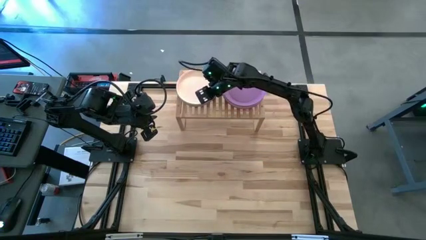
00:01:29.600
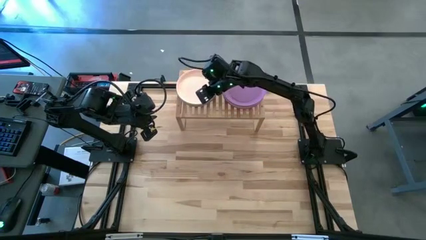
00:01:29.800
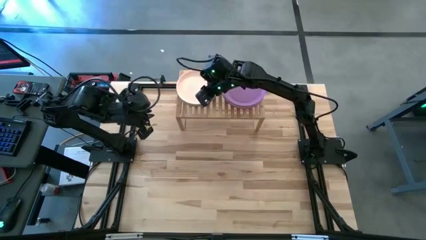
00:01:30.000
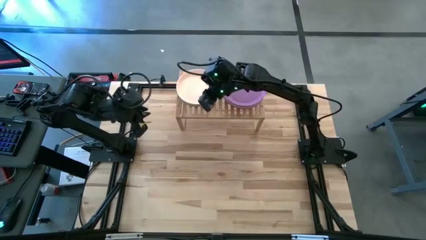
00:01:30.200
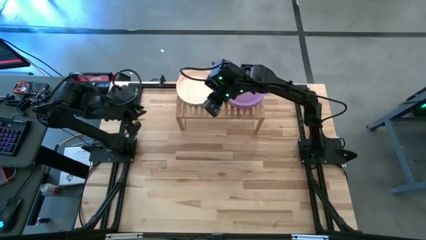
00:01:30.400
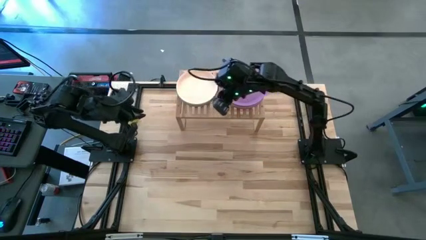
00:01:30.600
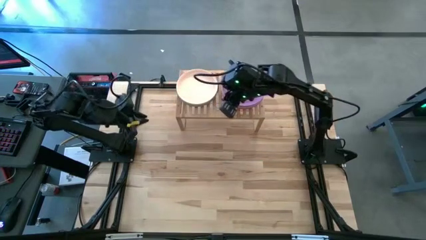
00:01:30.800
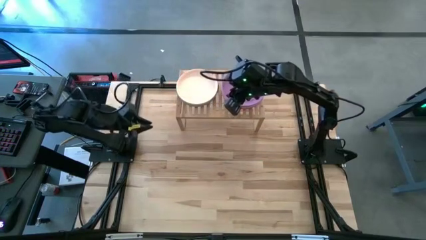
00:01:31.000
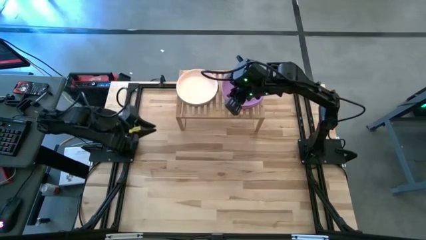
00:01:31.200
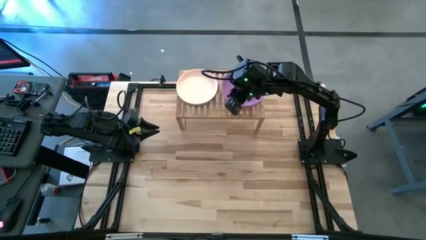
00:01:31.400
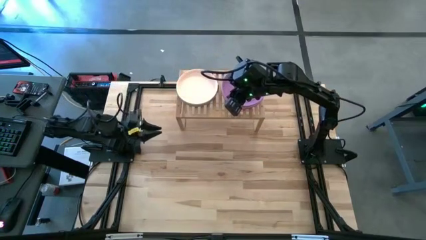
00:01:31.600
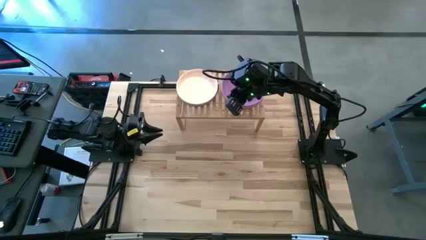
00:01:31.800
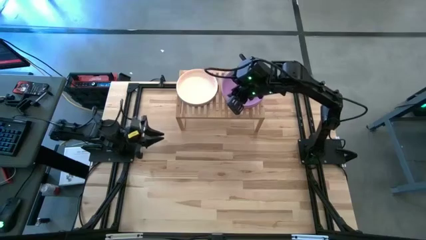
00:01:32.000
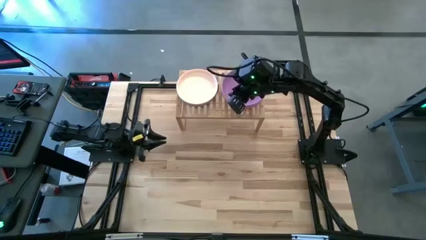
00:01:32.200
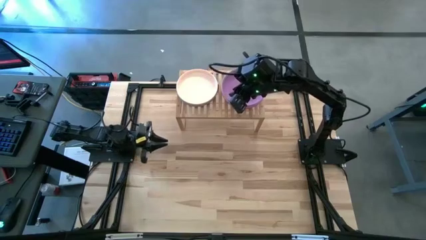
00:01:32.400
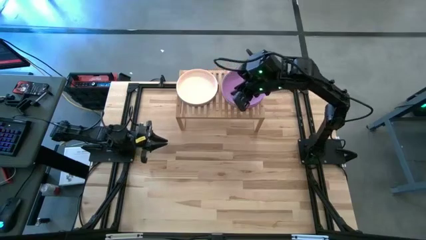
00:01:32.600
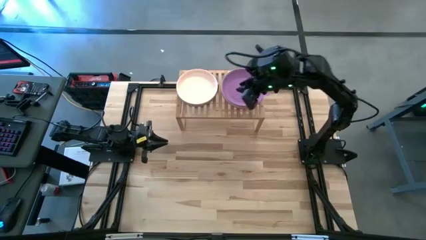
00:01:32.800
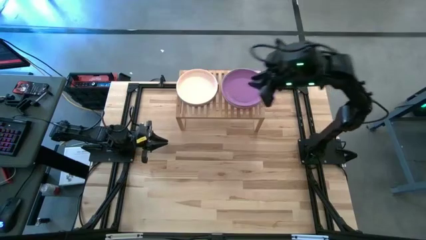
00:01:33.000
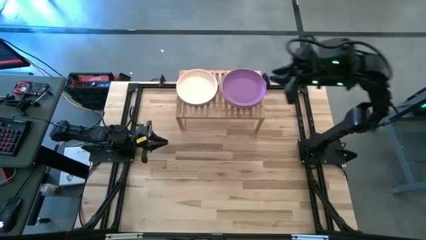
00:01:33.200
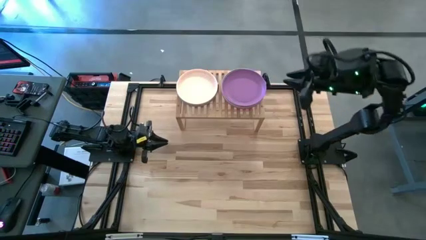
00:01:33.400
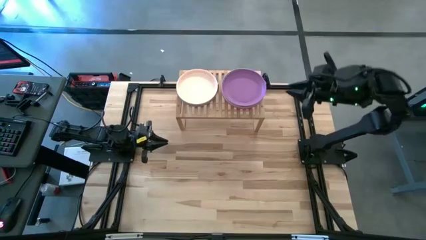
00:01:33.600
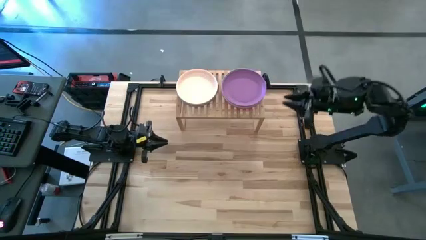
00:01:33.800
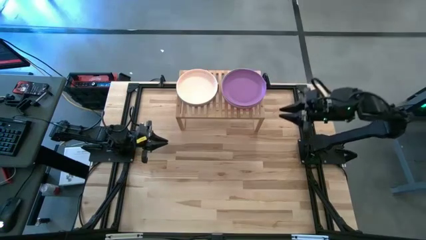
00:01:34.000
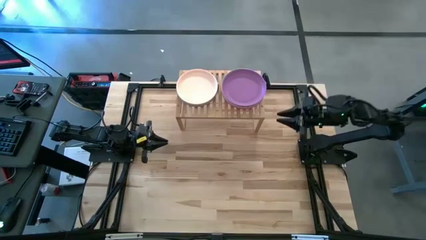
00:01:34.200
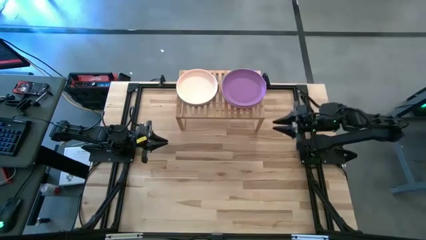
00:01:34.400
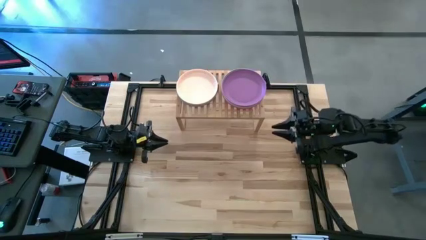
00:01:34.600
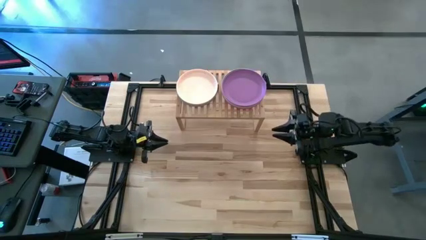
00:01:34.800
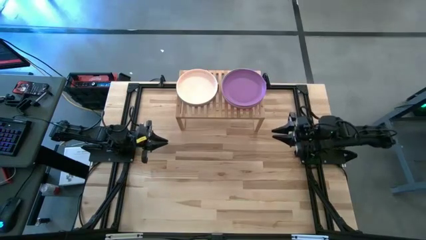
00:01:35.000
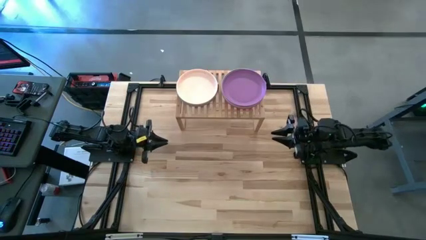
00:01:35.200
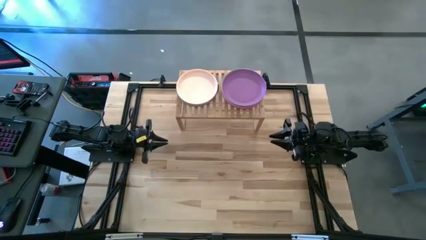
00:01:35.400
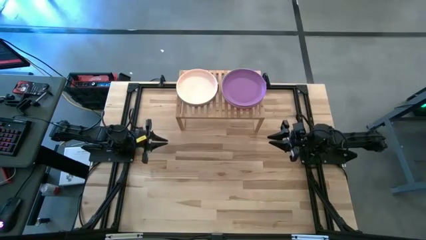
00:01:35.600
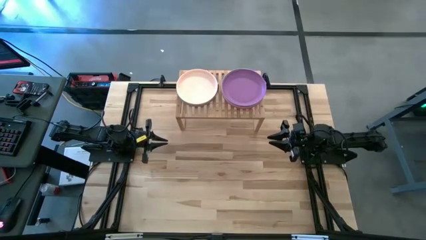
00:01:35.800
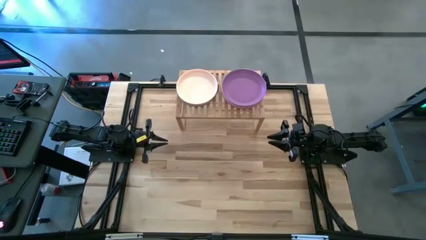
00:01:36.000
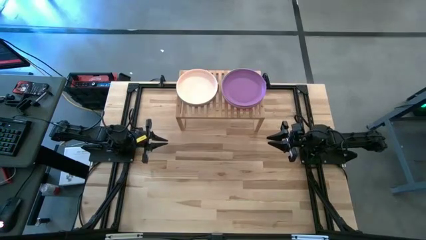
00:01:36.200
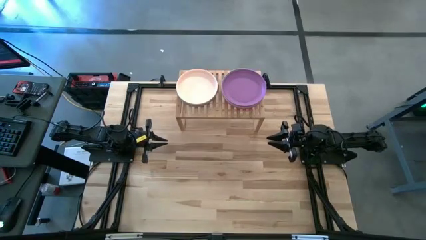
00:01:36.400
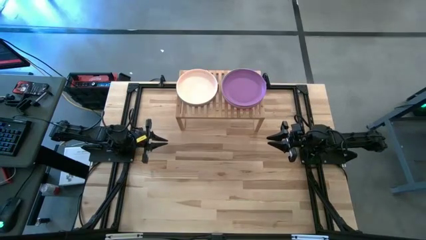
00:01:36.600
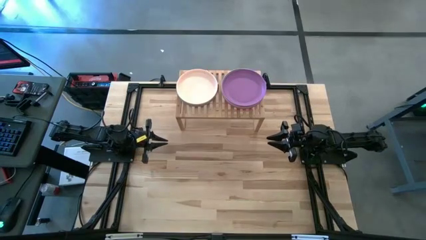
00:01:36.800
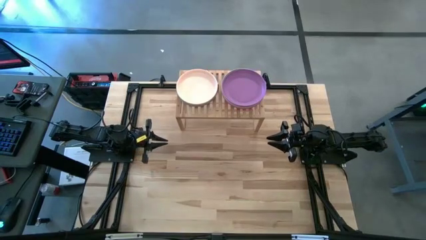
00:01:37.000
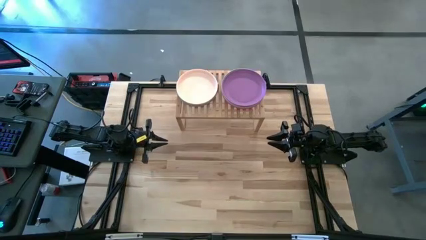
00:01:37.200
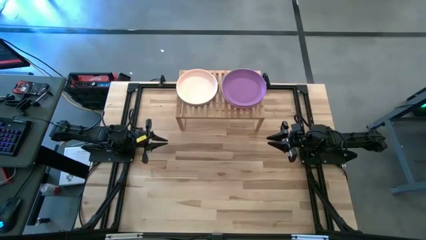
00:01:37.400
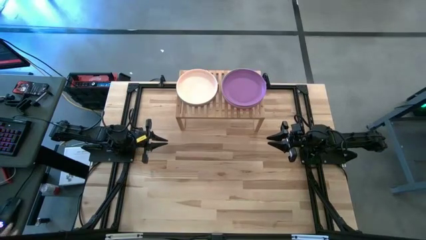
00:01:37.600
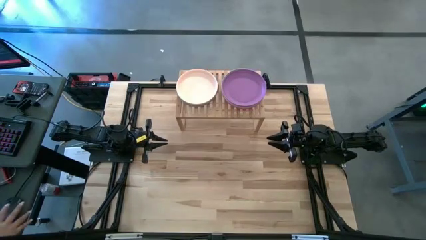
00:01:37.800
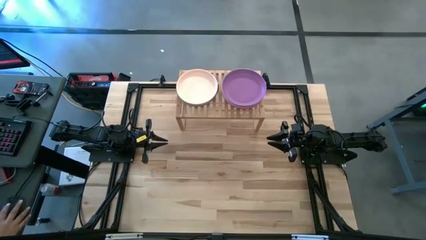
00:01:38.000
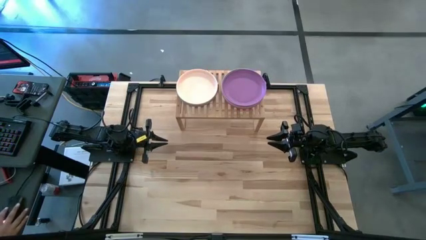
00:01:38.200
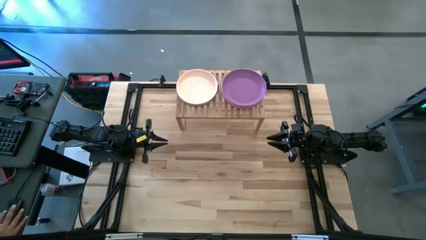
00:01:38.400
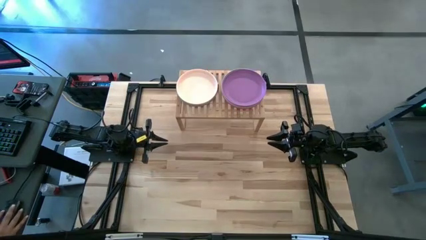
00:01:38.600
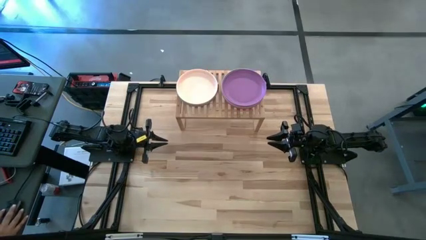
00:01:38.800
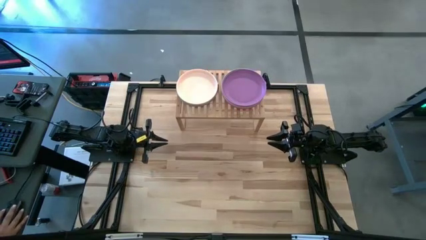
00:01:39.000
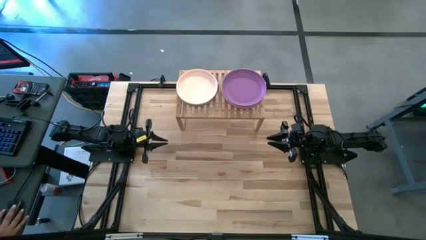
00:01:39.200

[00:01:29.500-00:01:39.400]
Task: Place and stack plates onto a shelf
Return to Home Position

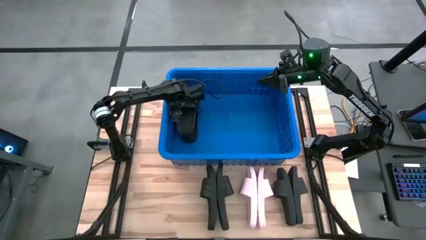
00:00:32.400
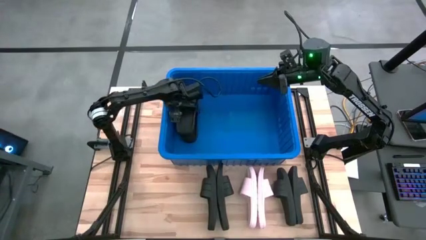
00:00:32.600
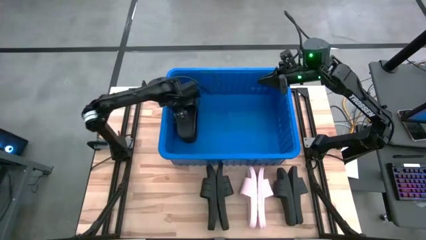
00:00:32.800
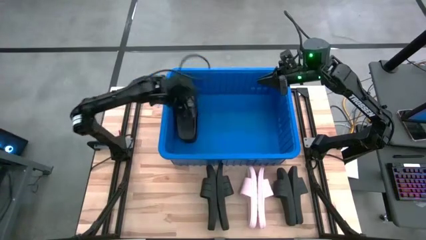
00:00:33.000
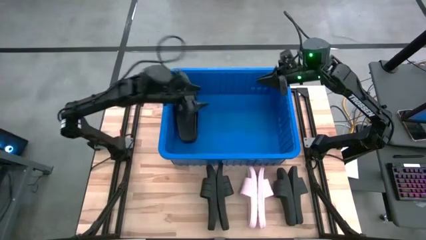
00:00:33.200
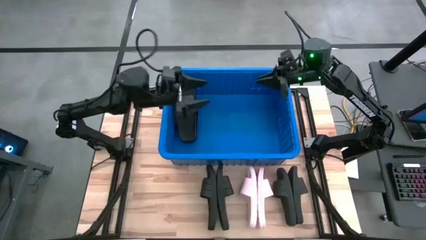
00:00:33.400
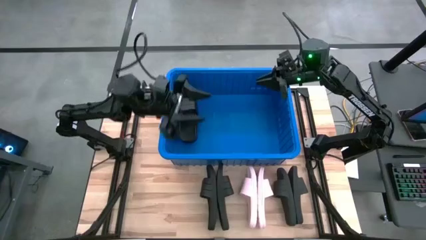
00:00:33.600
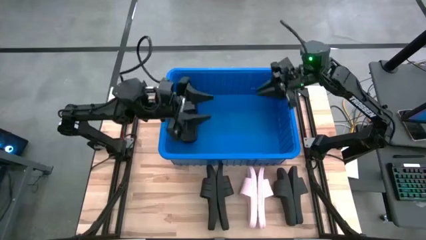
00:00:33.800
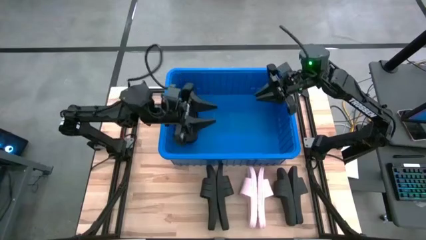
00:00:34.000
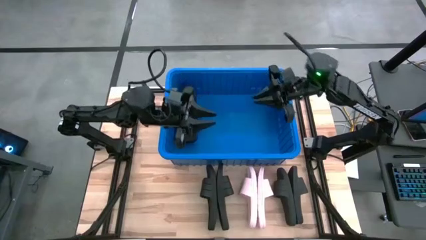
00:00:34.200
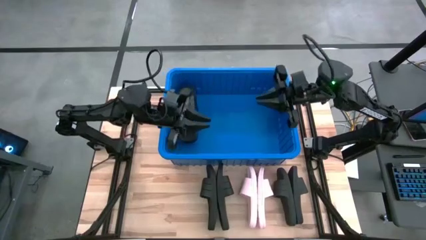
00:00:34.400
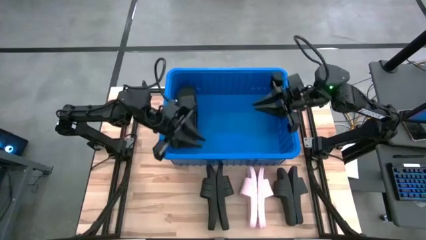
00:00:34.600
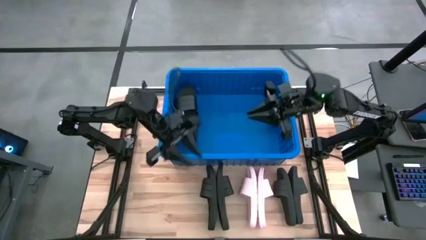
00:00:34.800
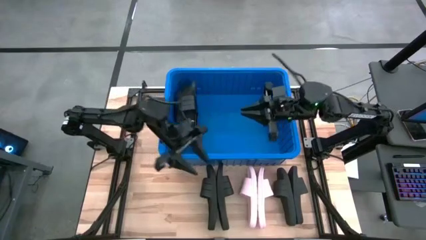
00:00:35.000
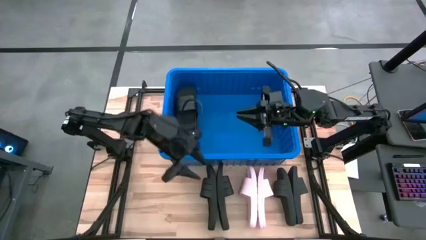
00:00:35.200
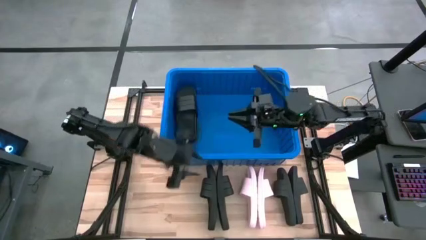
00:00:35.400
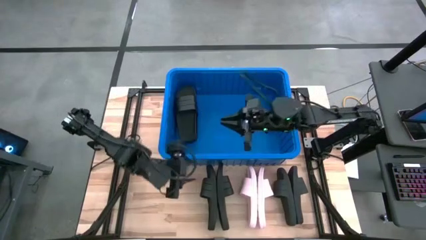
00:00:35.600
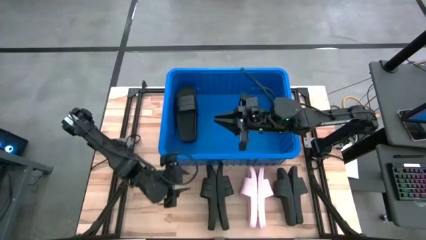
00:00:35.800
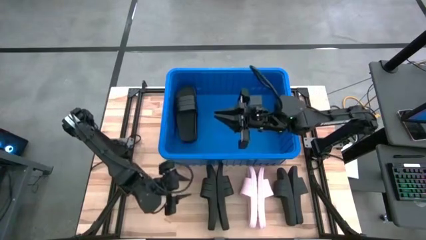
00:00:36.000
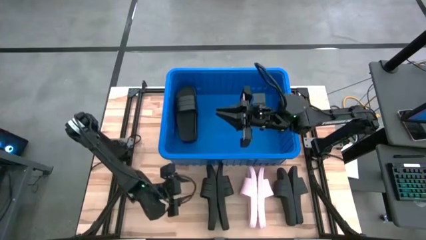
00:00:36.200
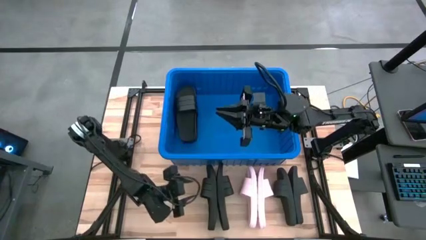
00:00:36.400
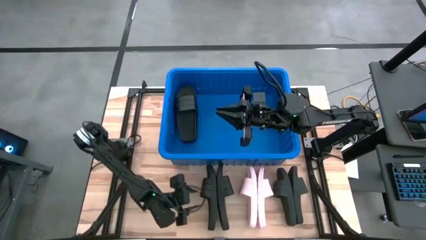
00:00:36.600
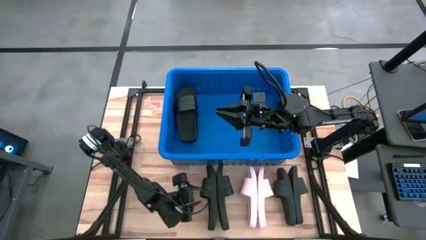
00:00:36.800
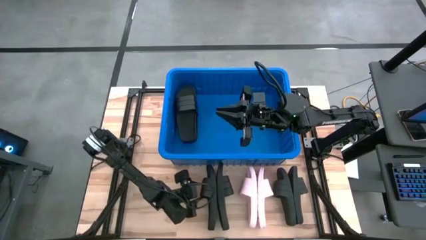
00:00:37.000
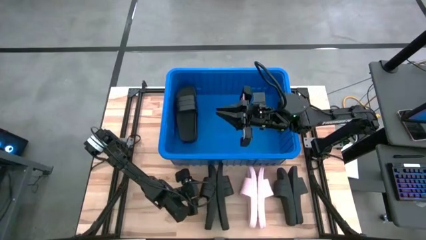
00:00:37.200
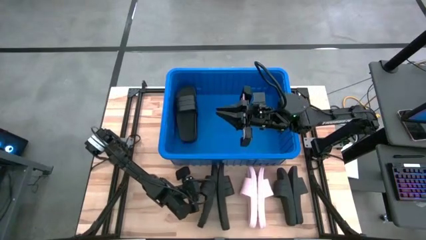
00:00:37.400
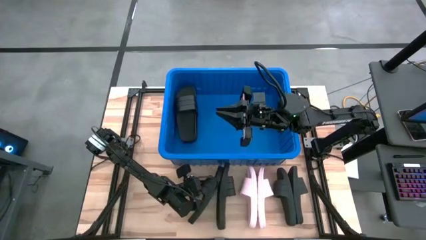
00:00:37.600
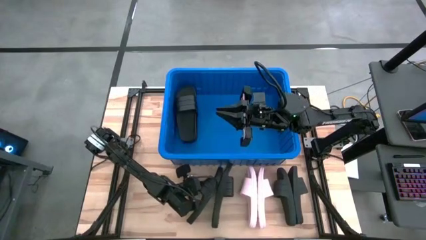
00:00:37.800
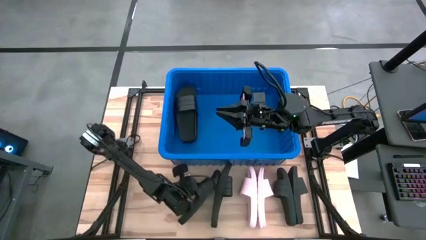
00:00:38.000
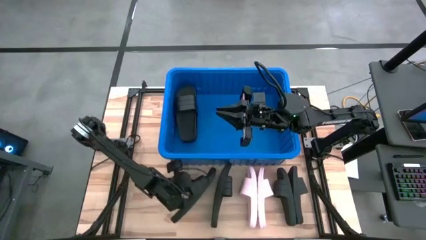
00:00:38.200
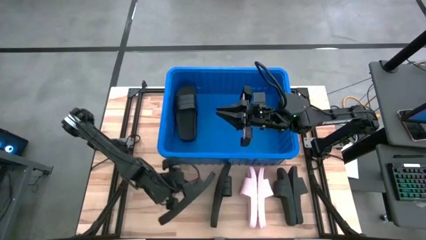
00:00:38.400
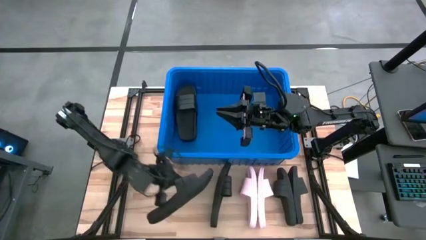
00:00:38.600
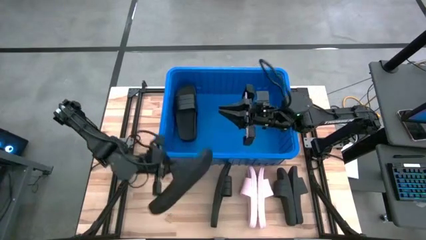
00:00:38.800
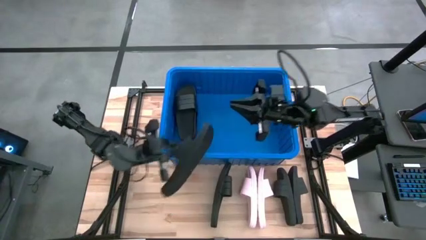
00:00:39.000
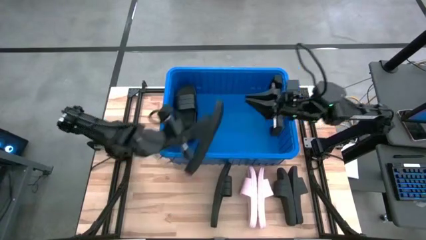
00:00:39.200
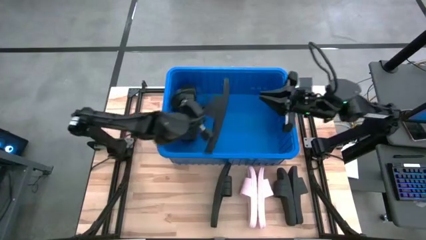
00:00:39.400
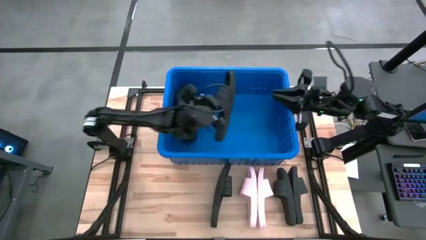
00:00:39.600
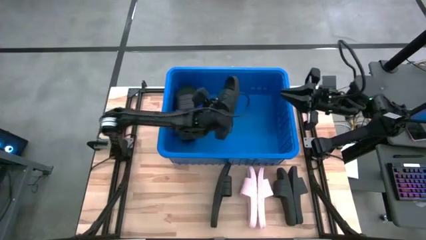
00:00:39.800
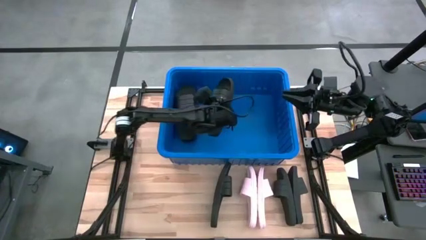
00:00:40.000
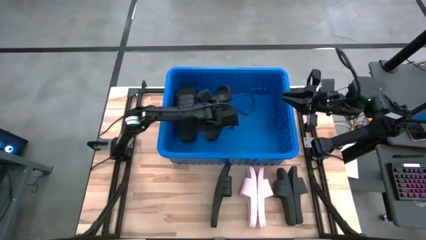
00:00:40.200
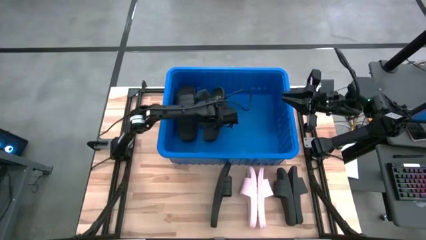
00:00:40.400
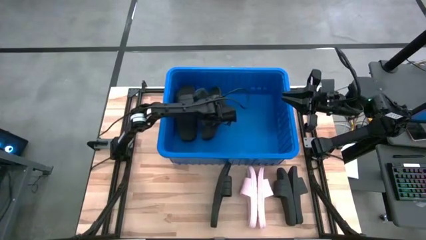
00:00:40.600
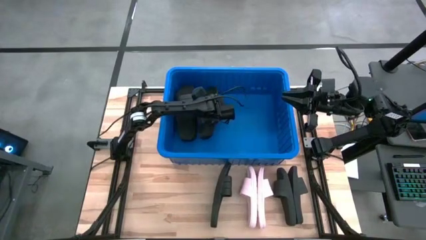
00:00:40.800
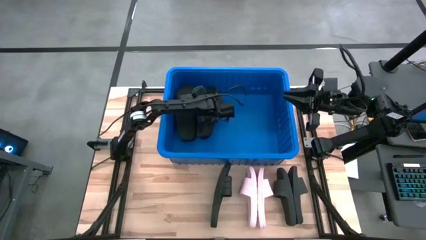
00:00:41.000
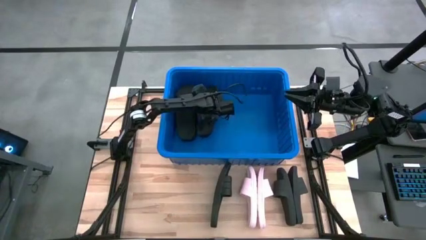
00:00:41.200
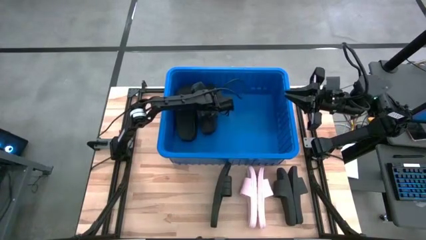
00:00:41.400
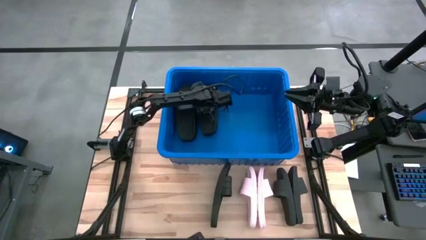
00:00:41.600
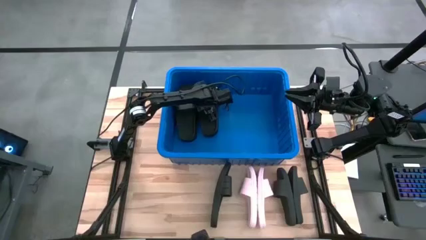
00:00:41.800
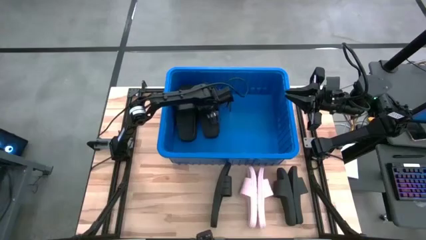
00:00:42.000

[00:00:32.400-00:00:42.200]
Task: Pick and place slides into bin
Put the black slide into the blue bin
